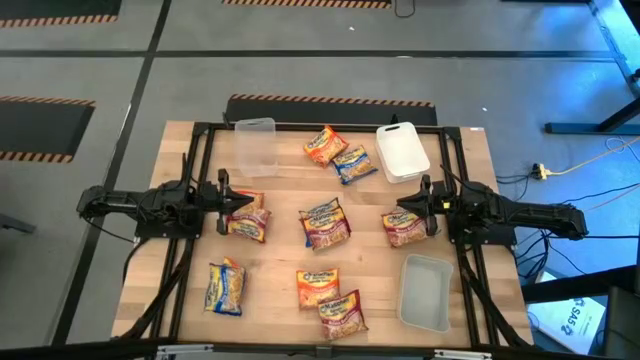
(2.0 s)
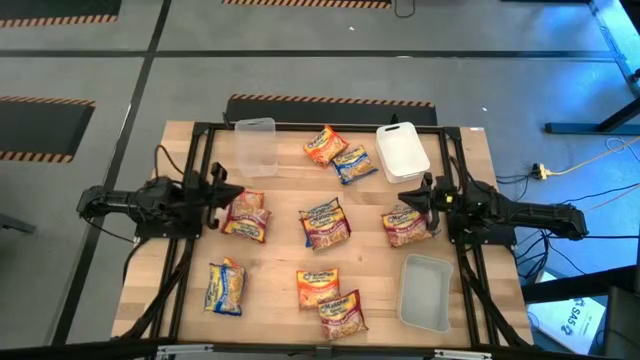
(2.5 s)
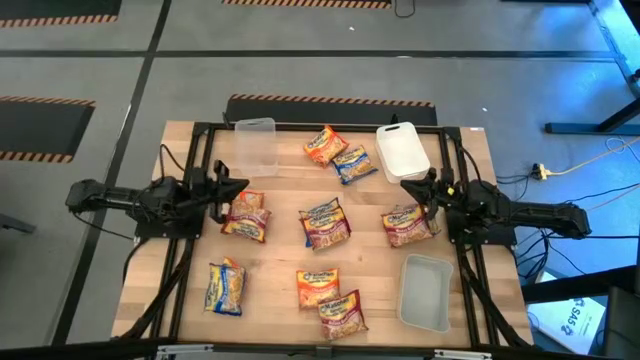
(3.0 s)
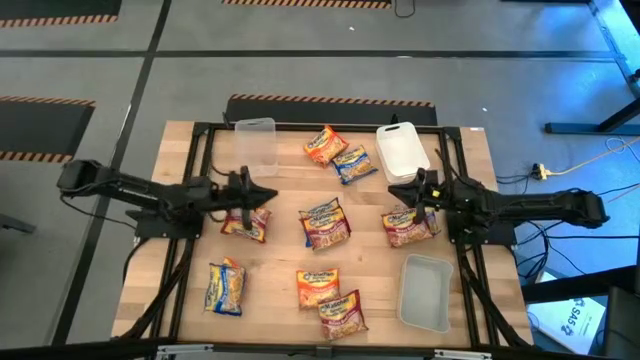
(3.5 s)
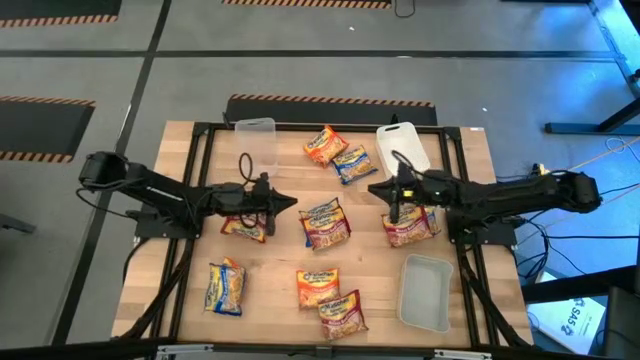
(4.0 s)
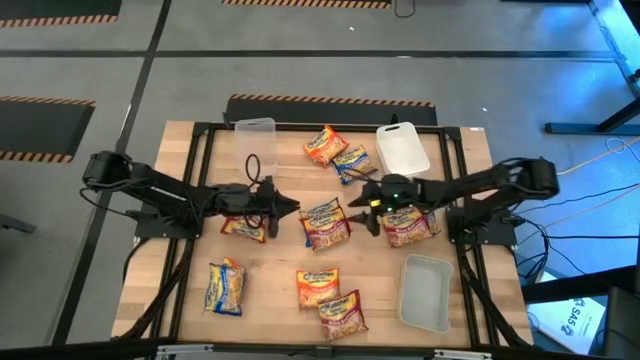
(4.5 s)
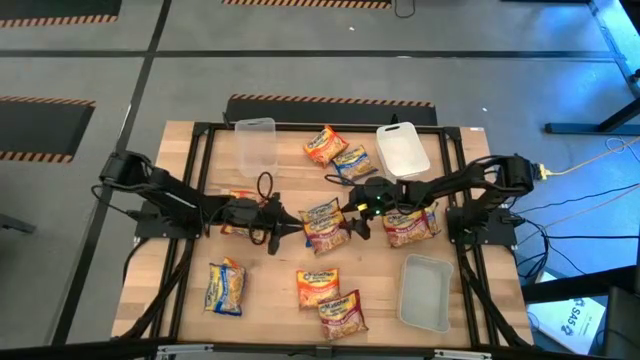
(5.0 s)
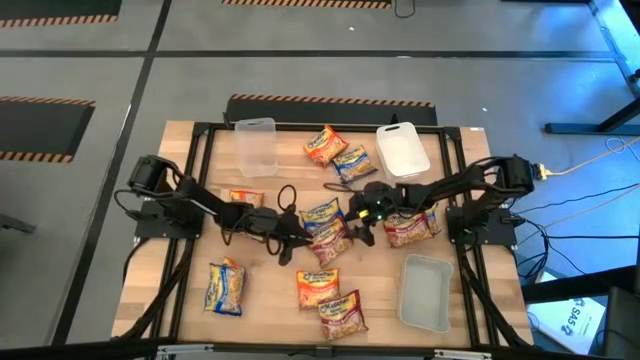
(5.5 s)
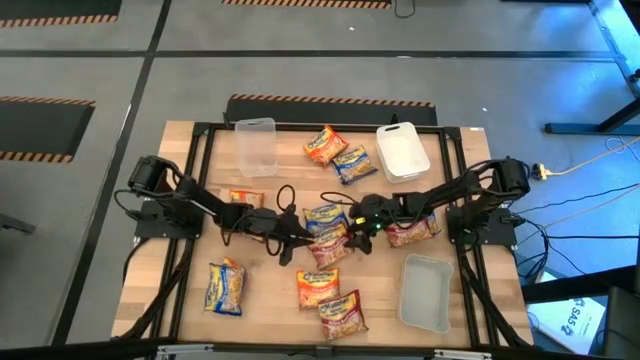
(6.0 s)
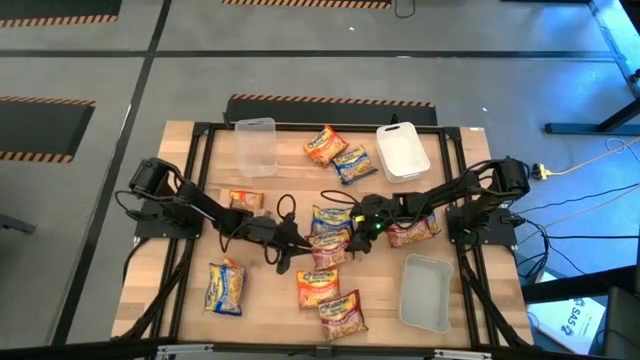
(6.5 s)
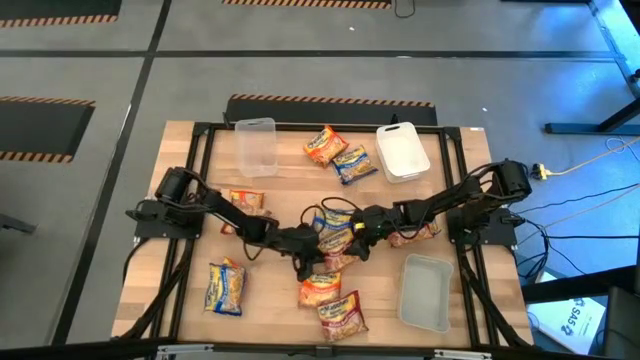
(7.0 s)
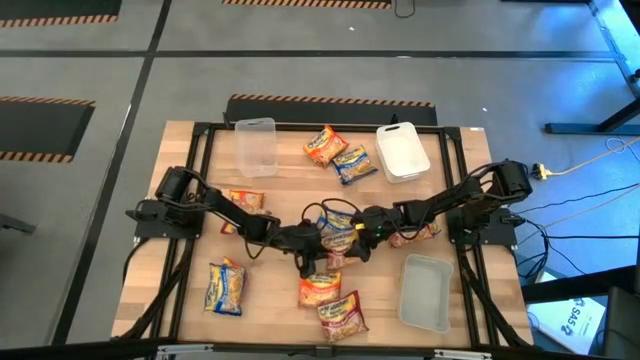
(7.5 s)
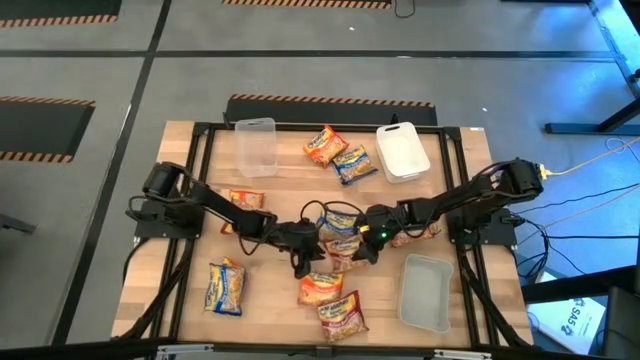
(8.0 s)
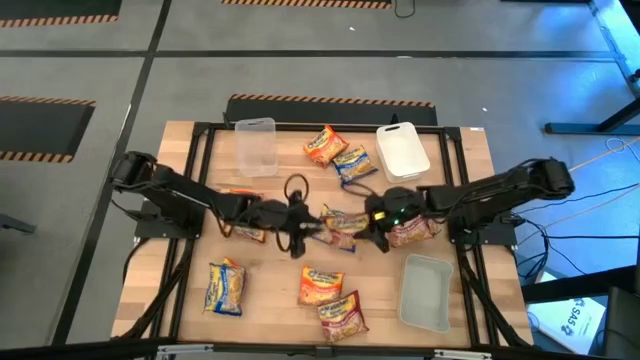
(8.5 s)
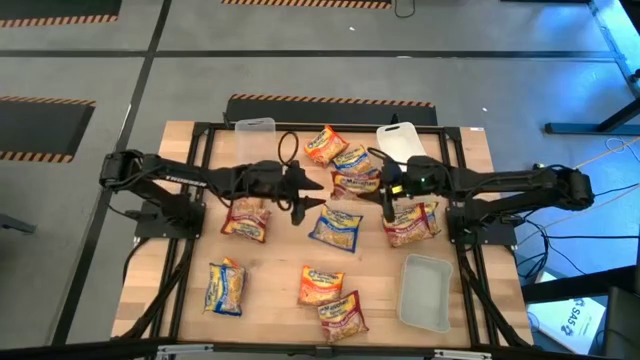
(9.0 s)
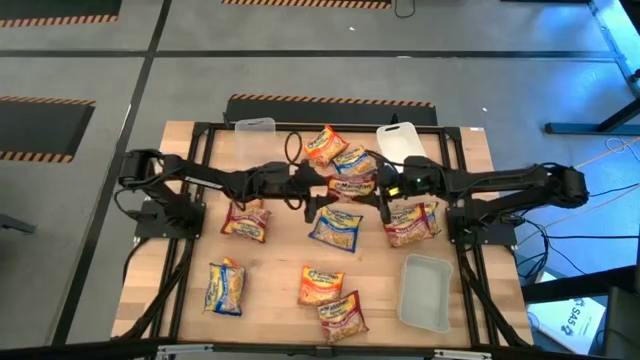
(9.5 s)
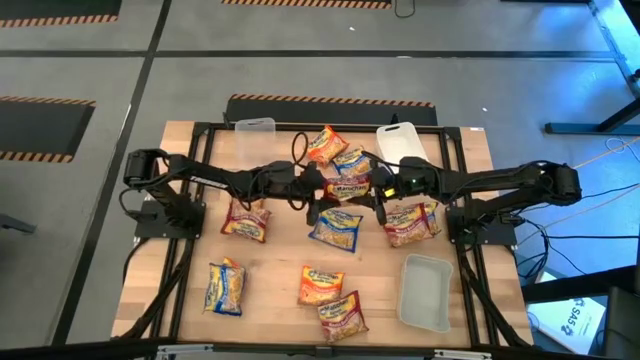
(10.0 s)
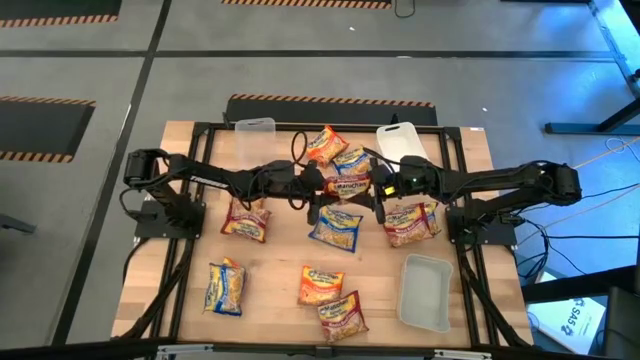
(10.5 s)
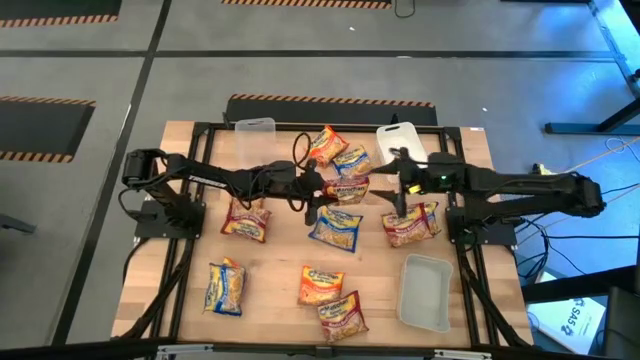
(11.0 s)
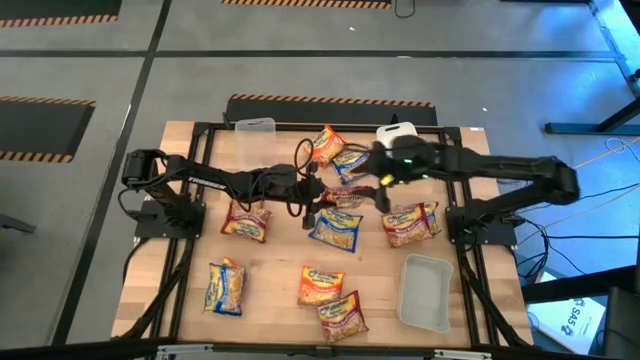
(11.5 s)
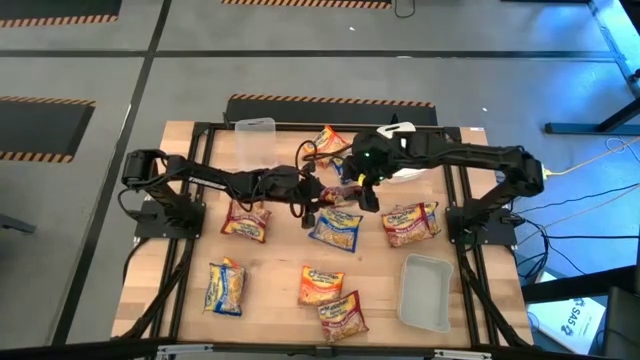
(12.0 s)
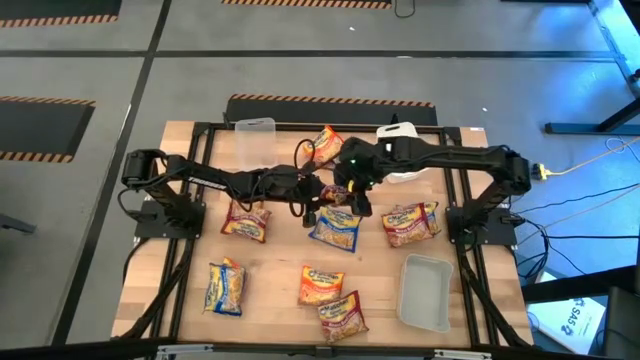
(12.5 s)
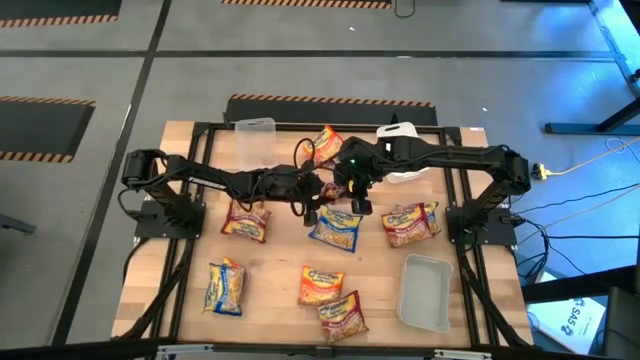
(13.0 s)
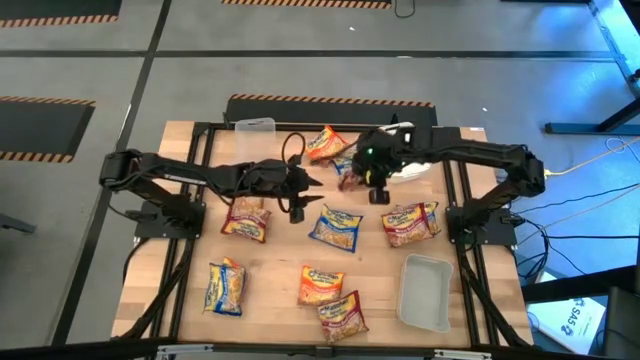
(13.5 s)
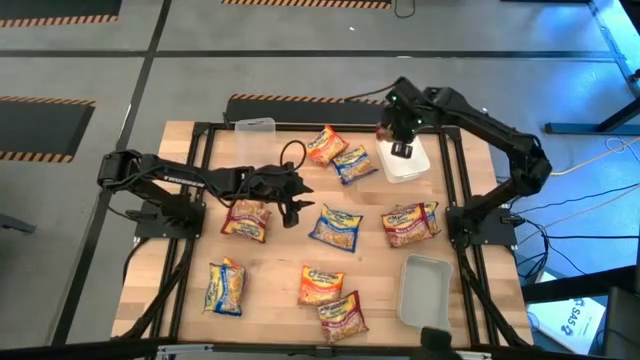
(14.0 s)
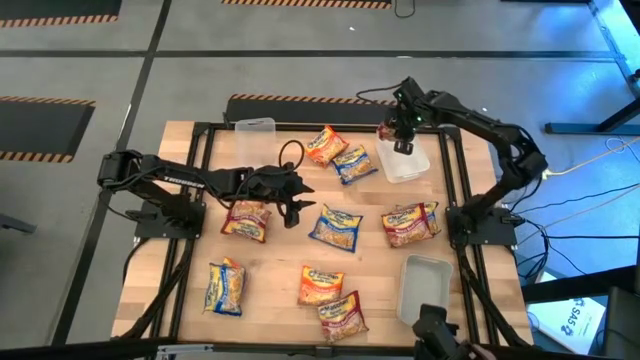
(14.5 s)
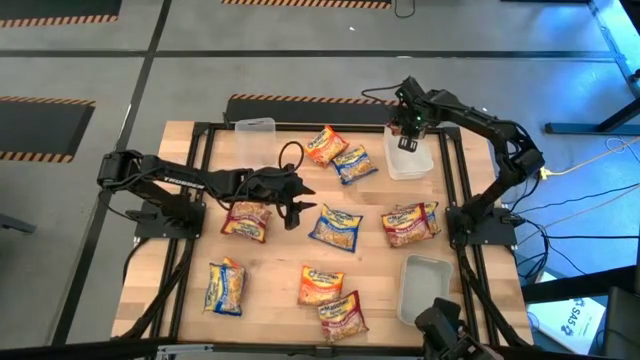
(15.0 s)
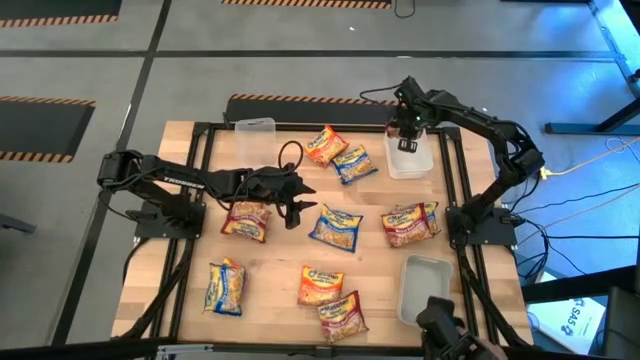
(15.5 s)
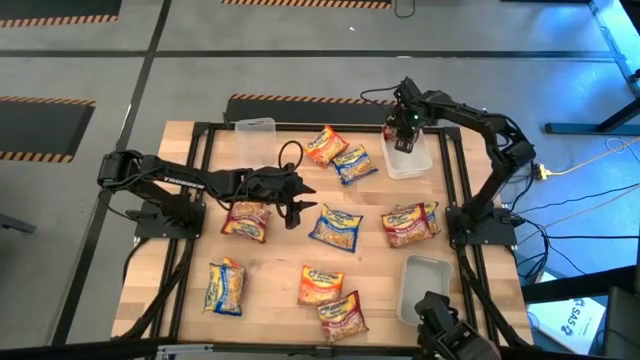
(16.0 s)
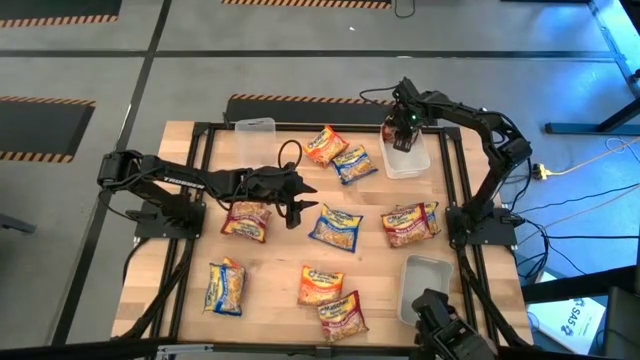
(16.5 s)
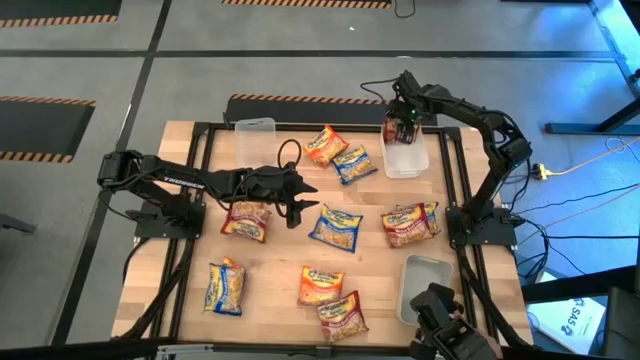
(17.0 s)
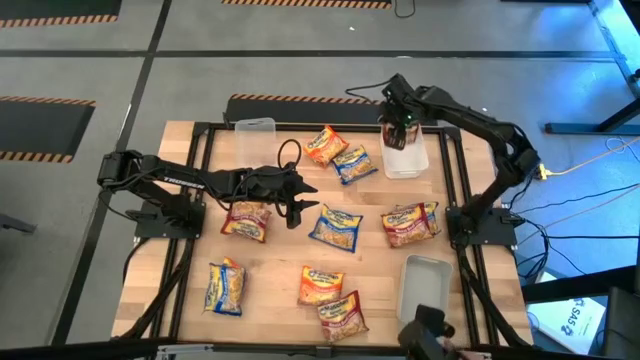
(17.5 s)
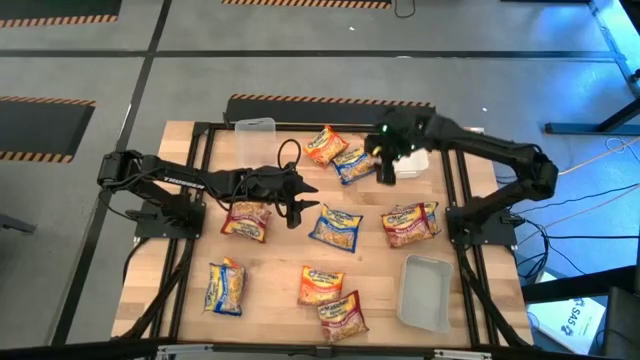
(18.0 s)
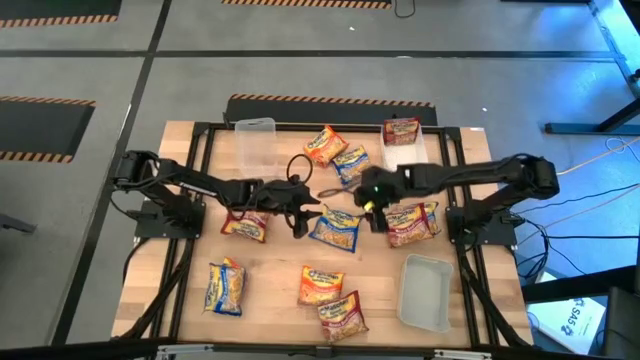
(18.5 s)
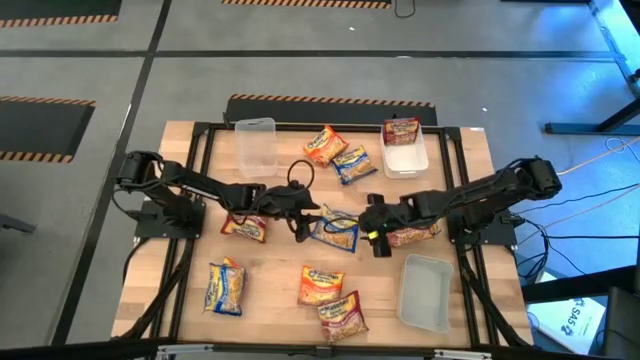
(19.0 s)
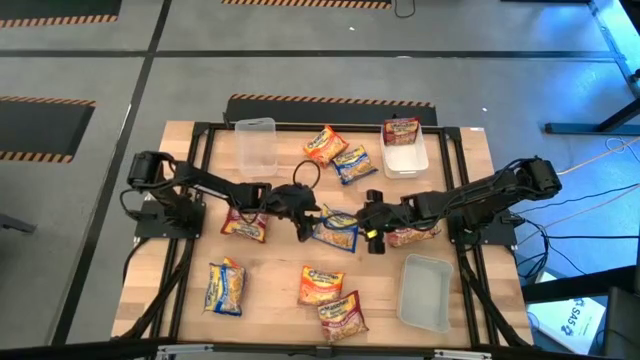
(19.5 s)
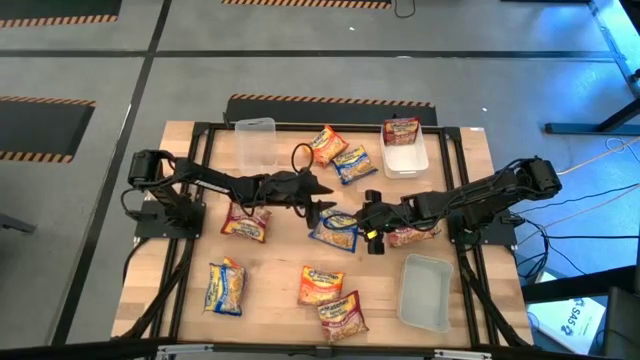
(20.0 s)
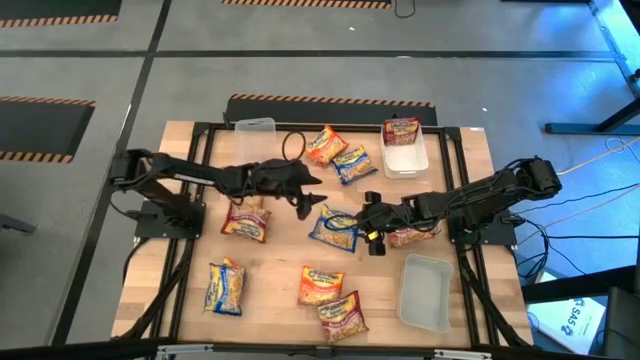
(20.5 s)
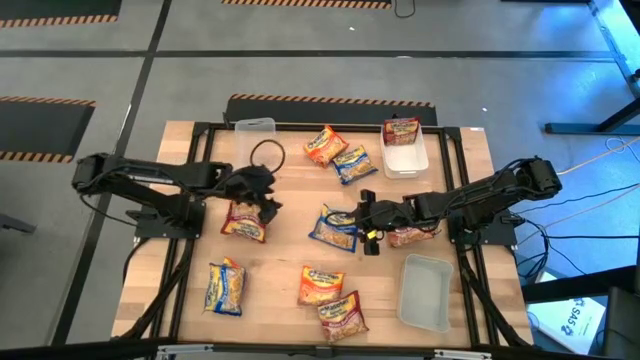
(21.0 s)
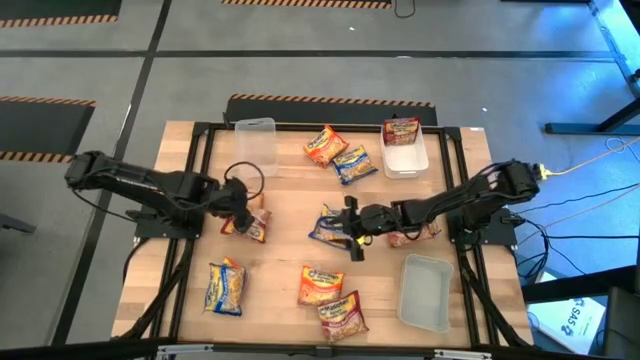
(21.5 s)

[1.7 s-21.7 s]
Task: Sort Maruchan noodles
Put the top center red noodle pack into the white bin
